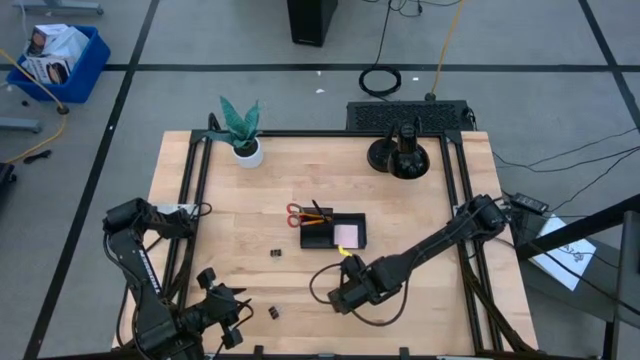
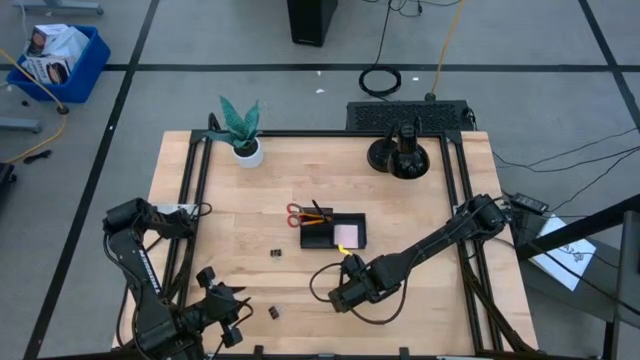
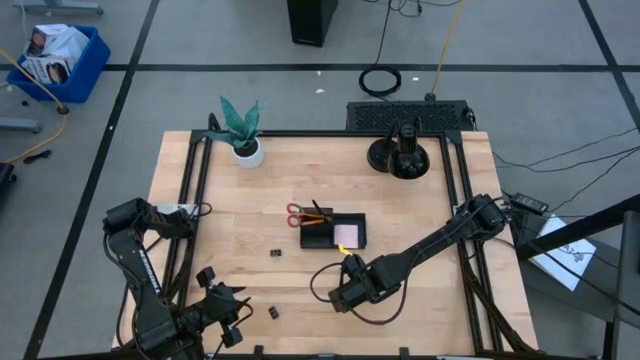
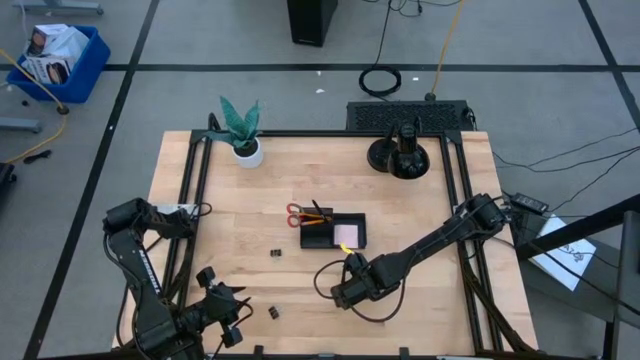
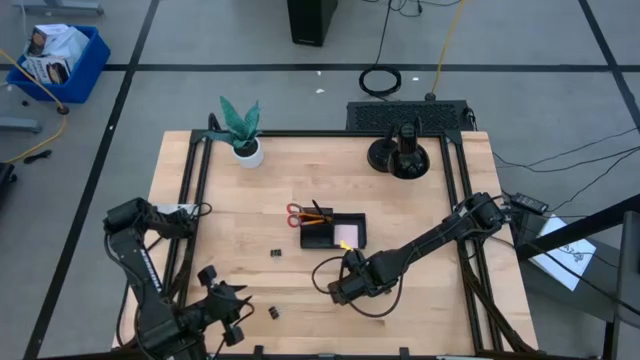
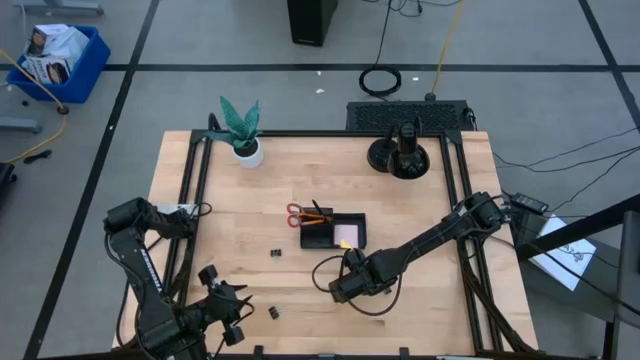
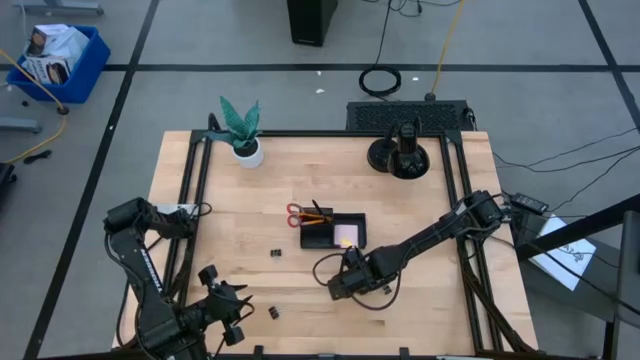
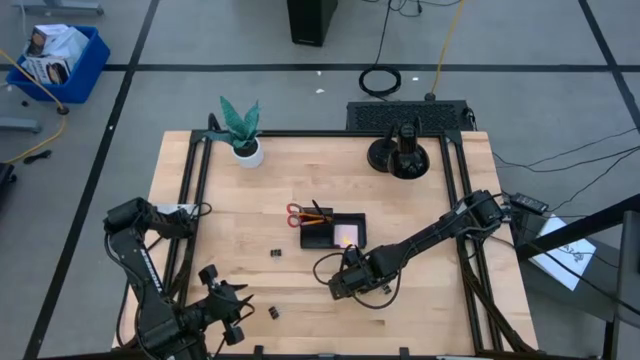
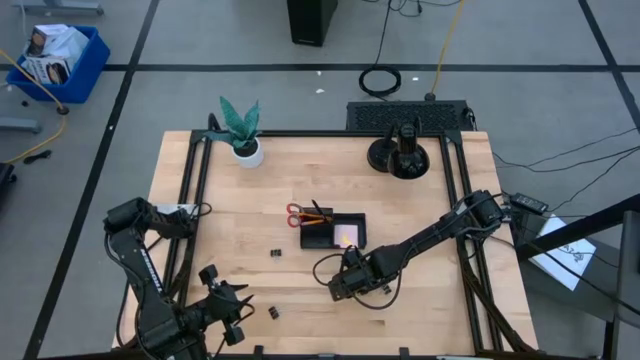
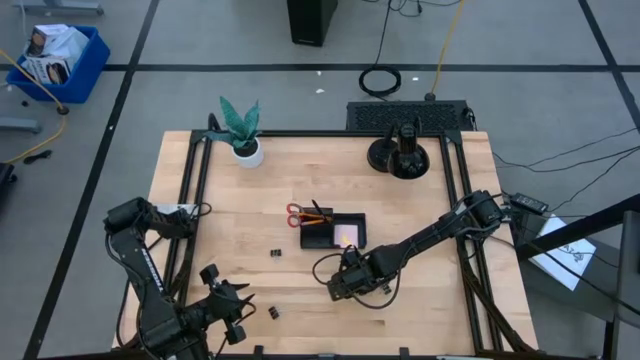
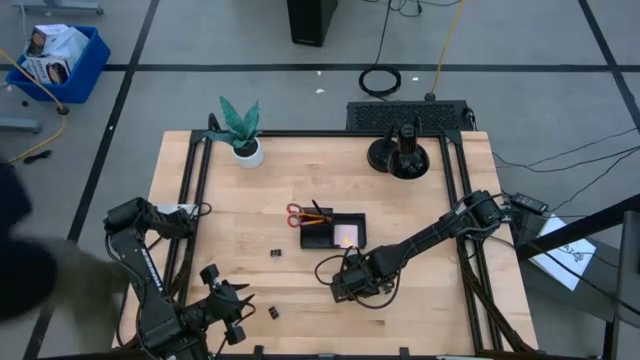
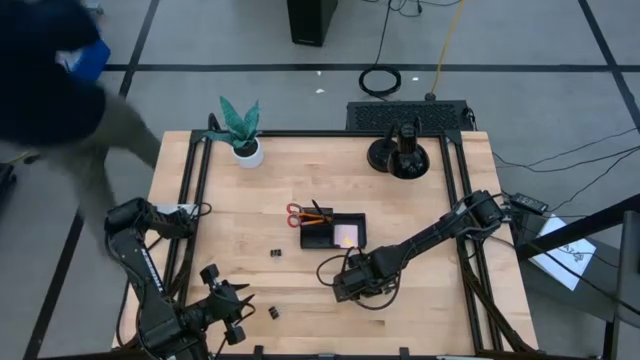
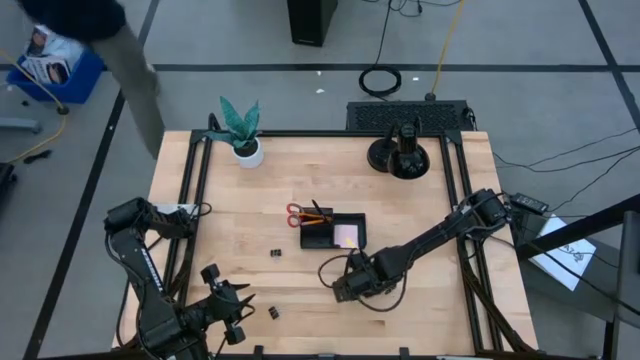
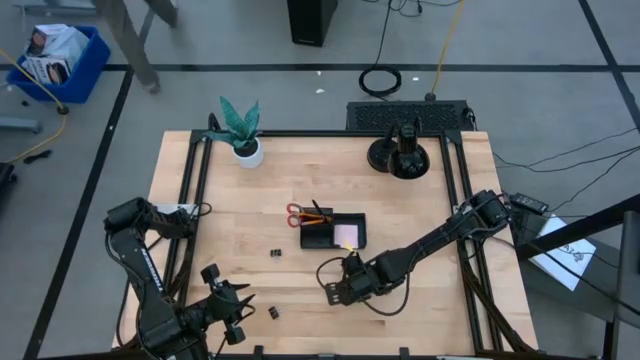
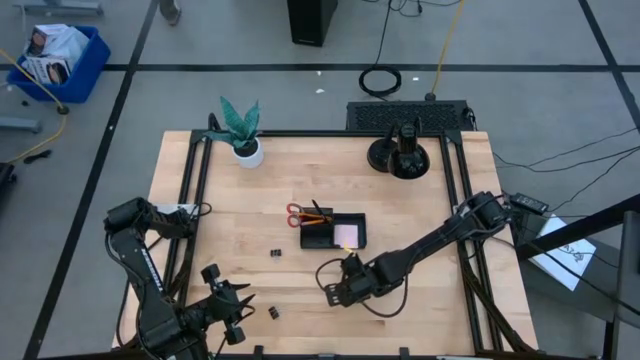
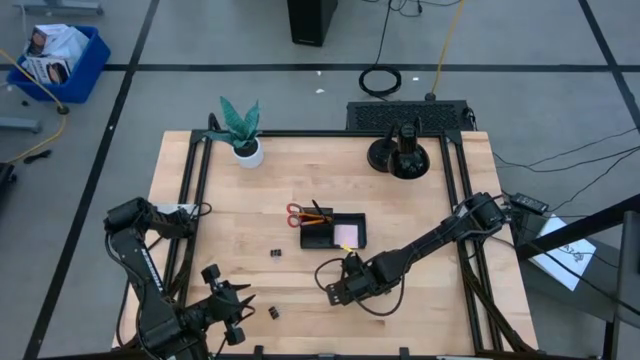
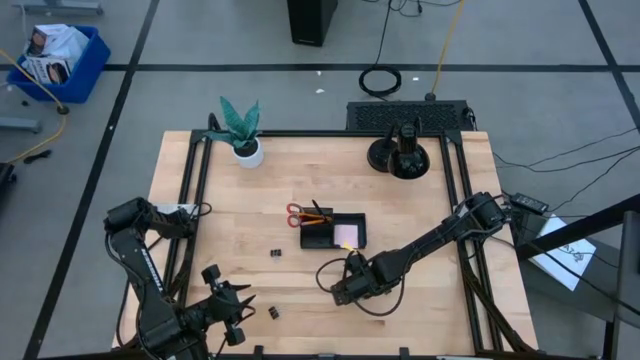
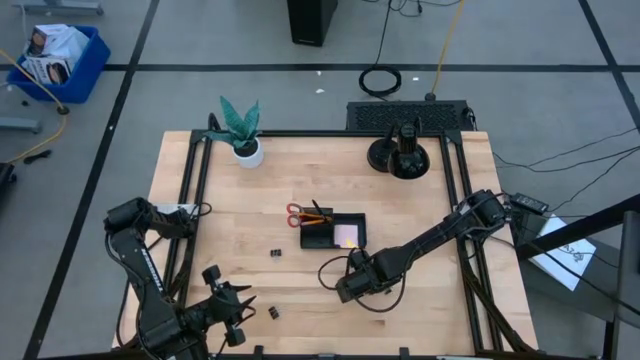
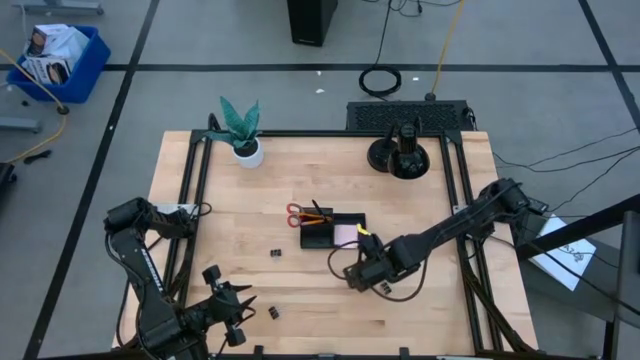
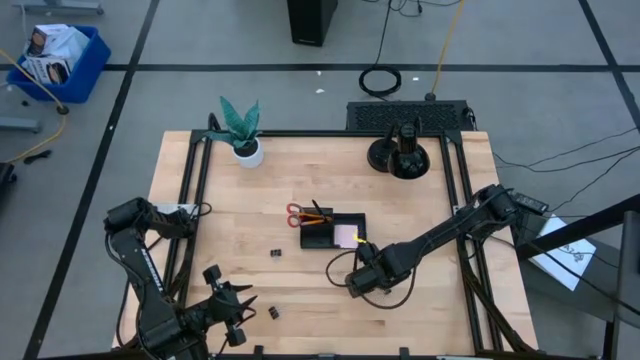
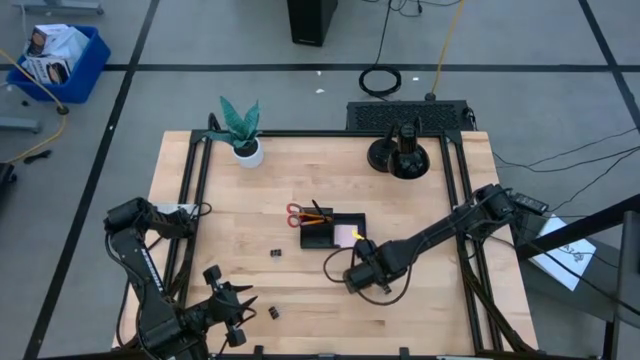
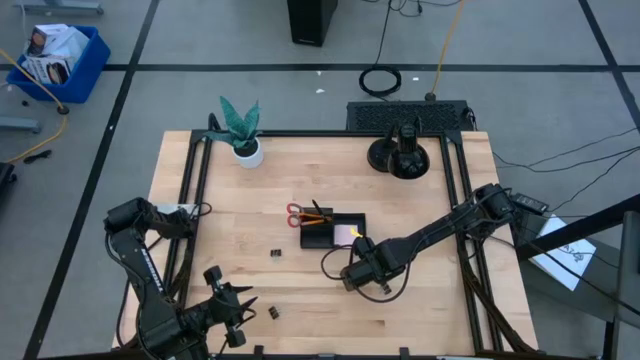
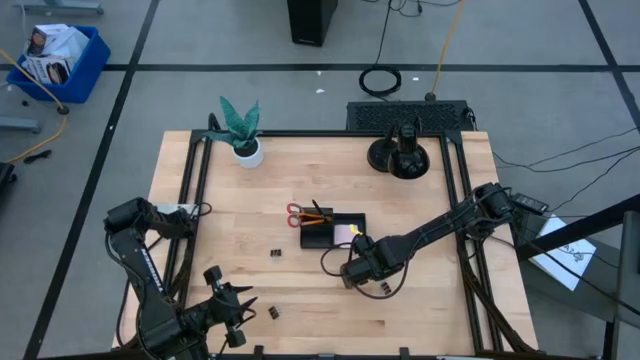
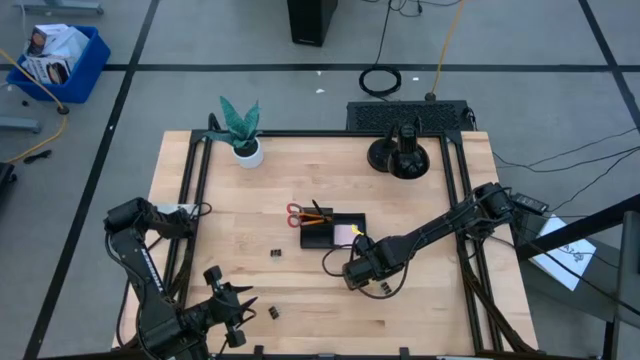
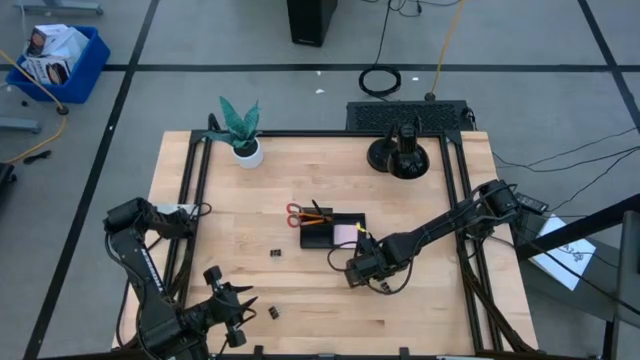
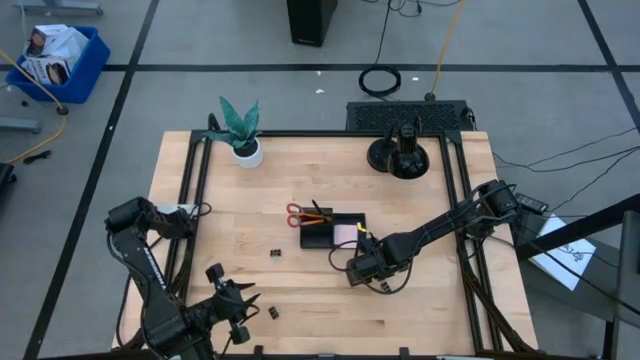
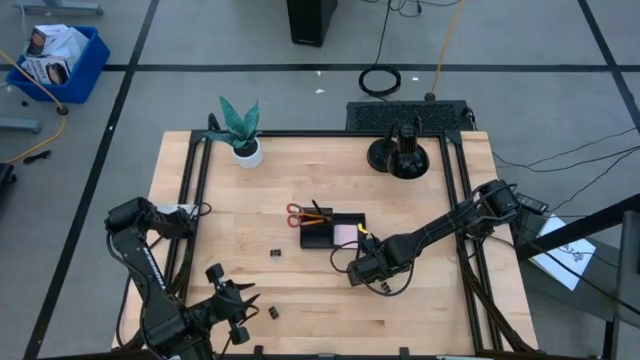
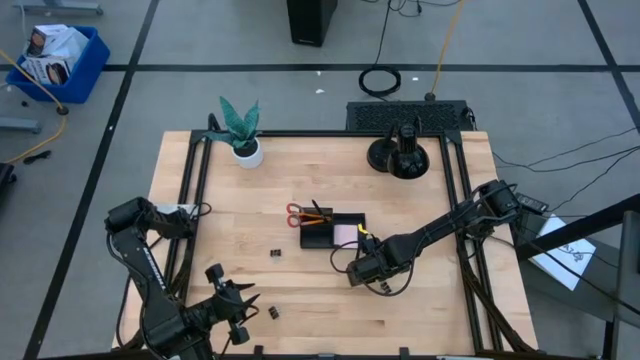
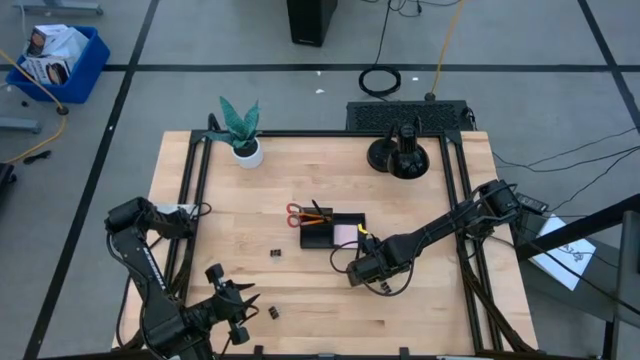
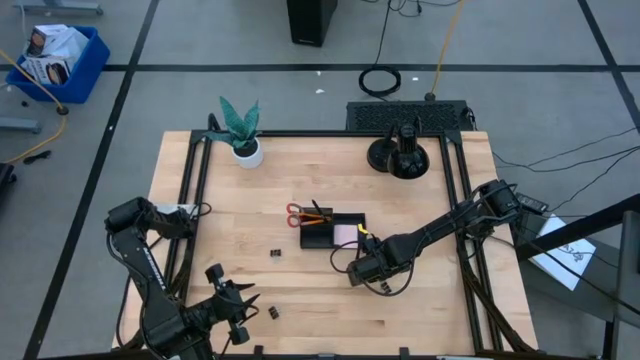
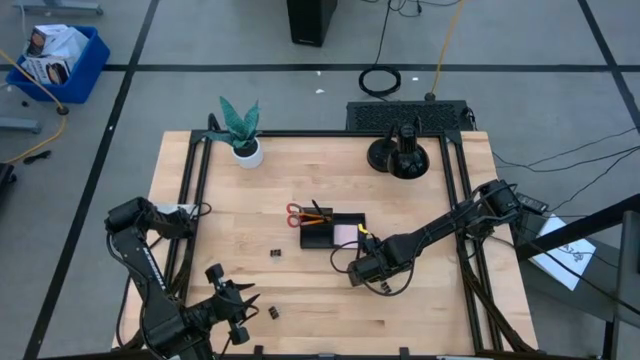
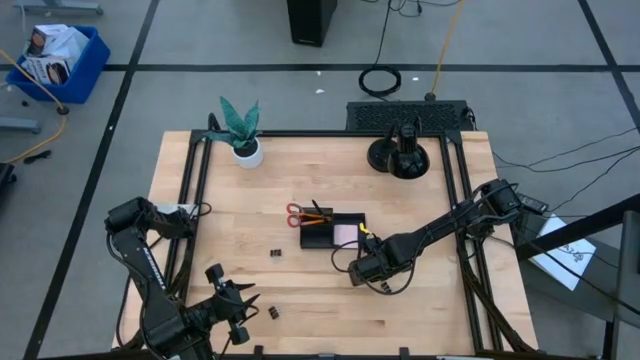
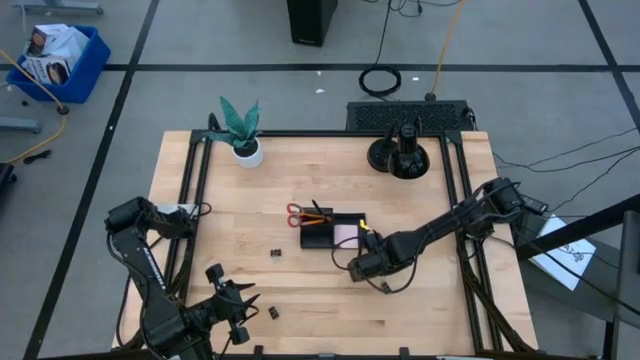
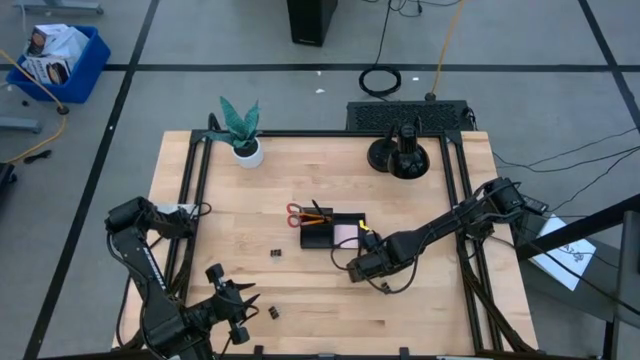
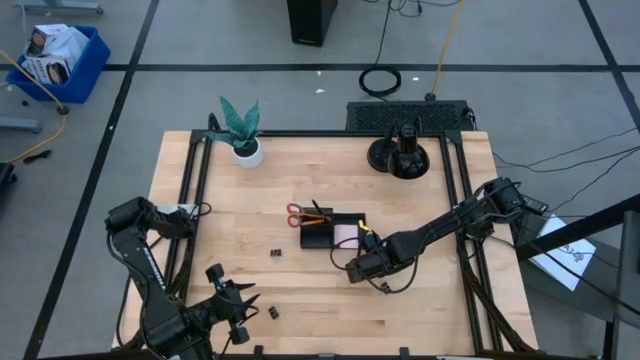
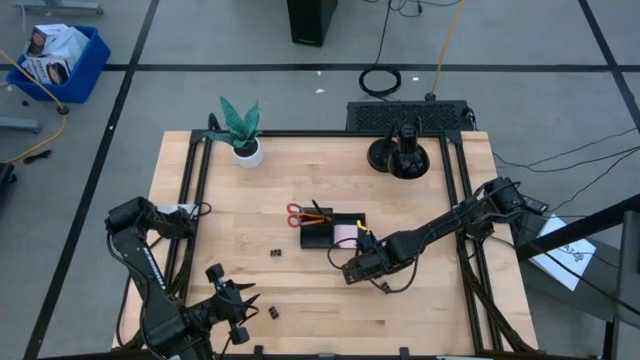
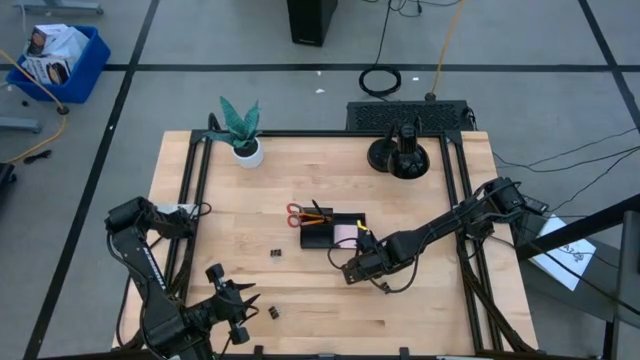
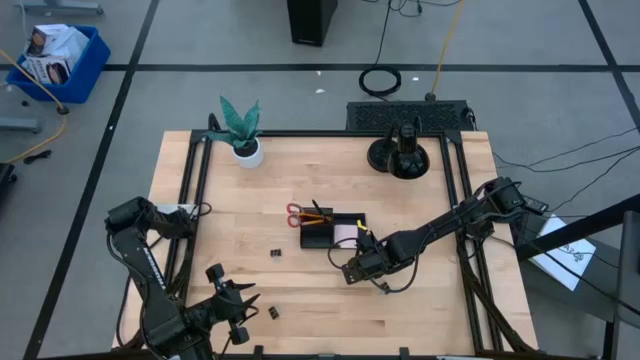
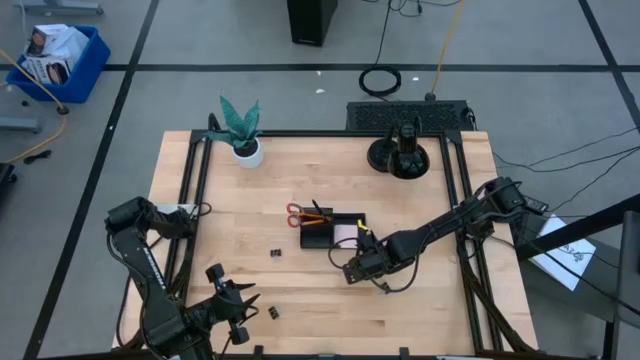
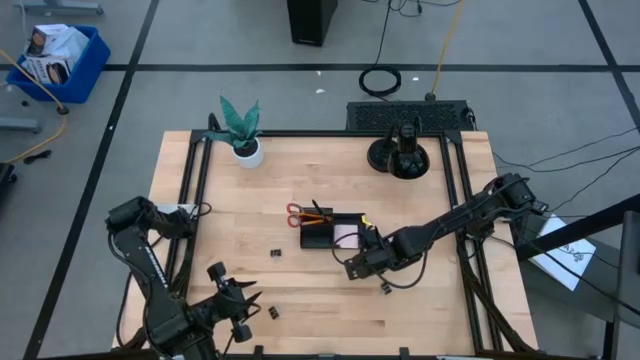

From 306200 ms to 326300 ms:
Task: Pick and place office supplies into organizer
Put the green eraser into the desk organizer
